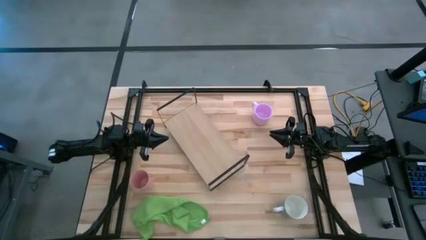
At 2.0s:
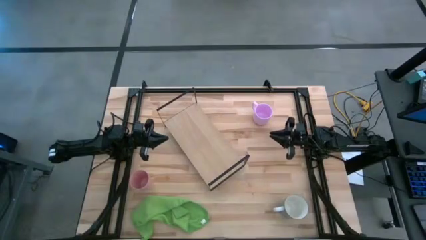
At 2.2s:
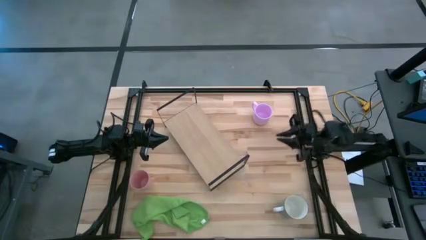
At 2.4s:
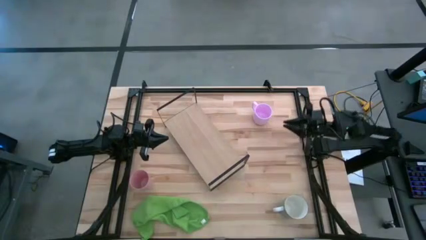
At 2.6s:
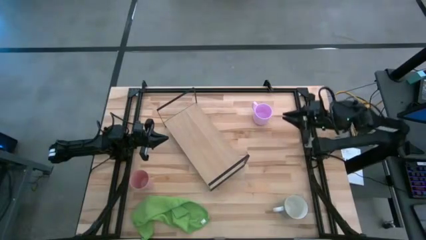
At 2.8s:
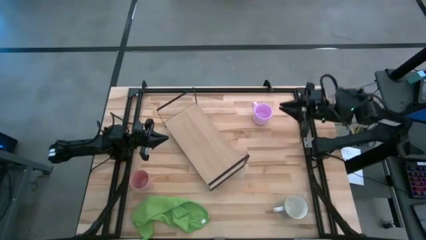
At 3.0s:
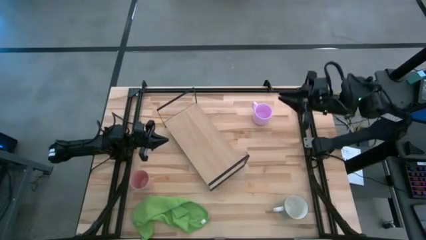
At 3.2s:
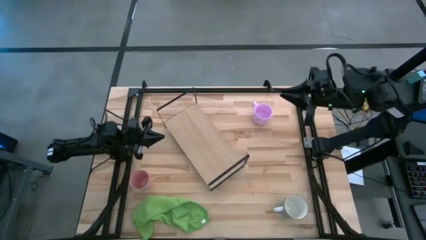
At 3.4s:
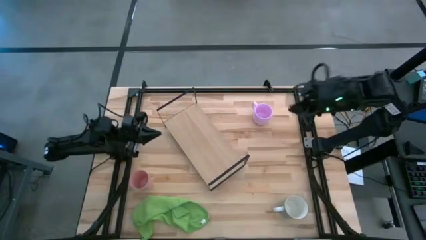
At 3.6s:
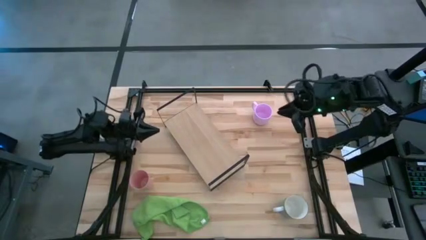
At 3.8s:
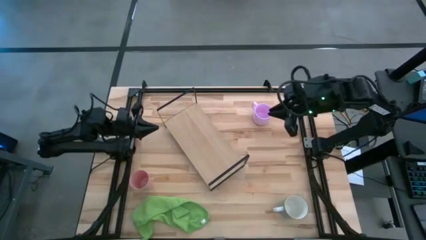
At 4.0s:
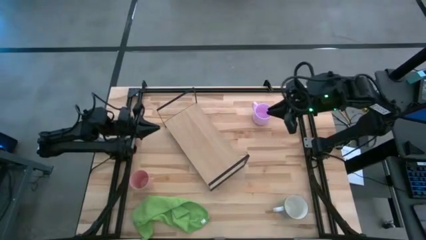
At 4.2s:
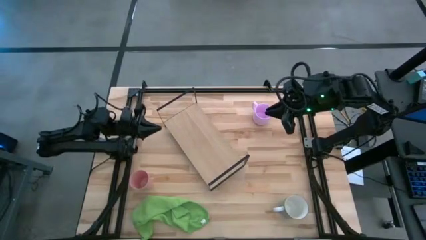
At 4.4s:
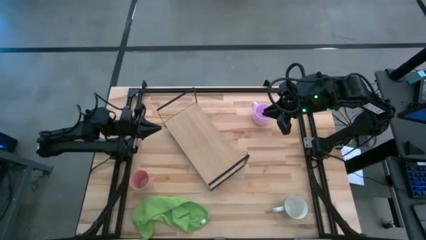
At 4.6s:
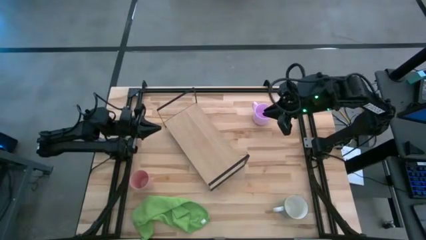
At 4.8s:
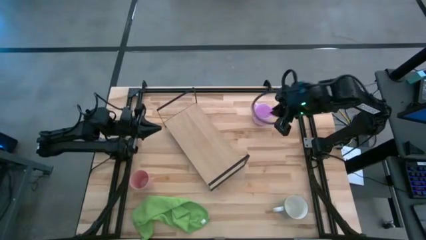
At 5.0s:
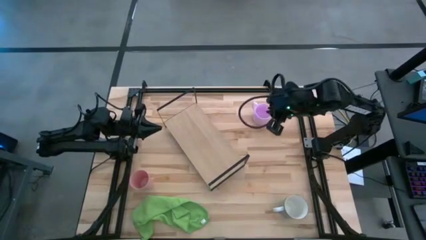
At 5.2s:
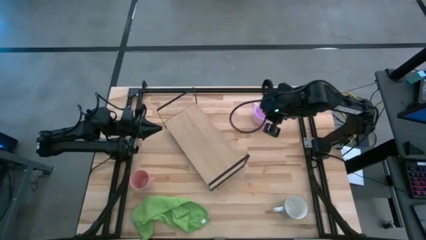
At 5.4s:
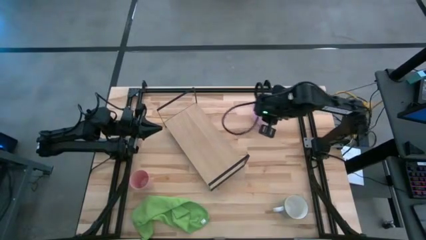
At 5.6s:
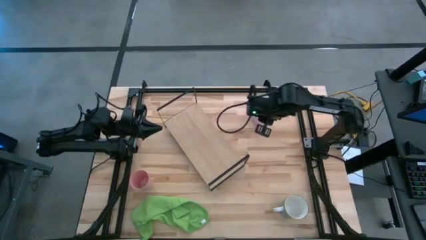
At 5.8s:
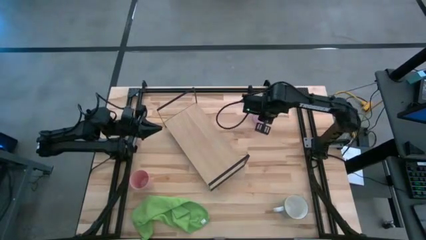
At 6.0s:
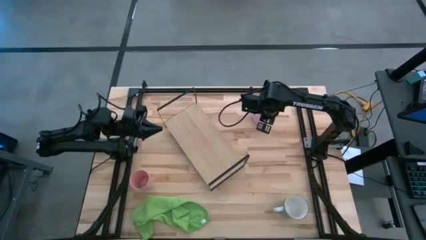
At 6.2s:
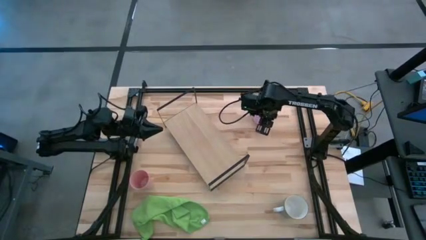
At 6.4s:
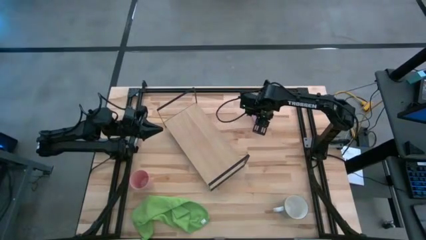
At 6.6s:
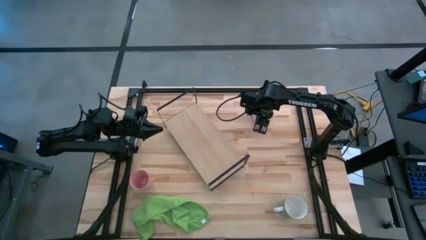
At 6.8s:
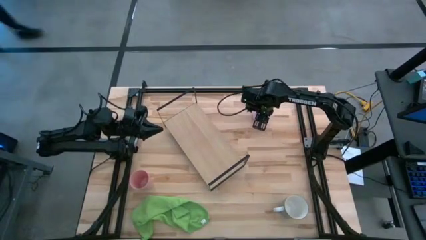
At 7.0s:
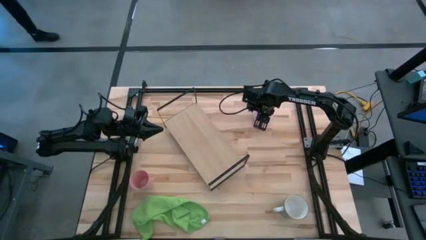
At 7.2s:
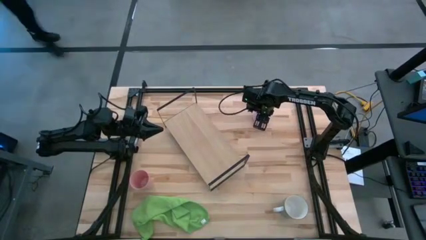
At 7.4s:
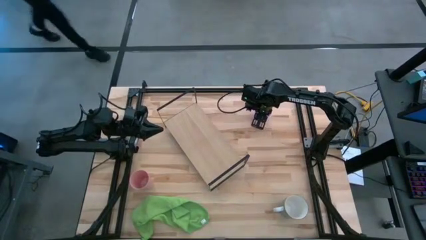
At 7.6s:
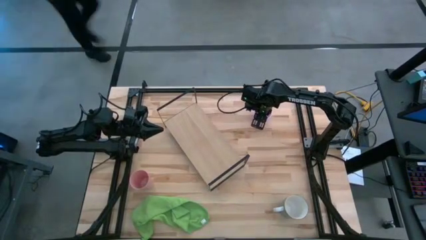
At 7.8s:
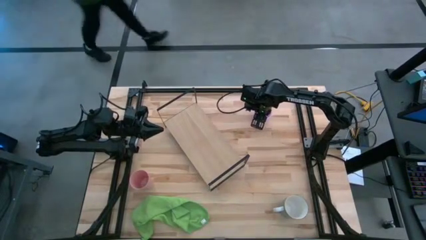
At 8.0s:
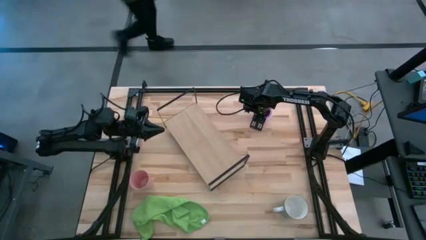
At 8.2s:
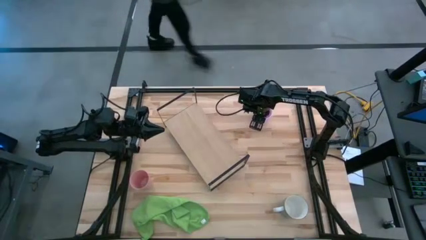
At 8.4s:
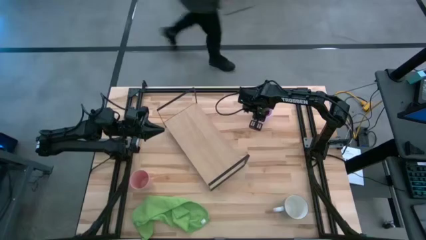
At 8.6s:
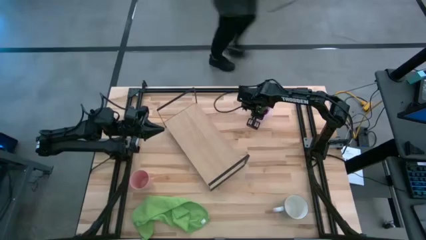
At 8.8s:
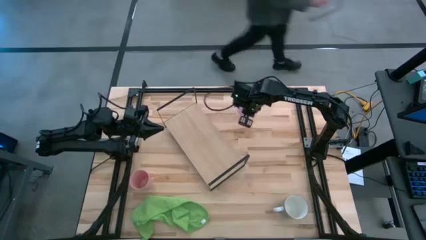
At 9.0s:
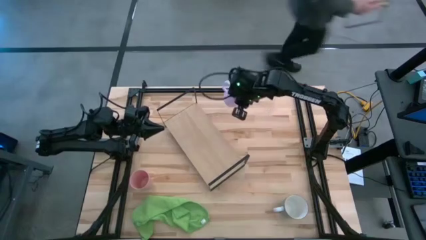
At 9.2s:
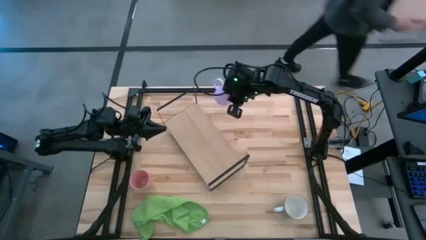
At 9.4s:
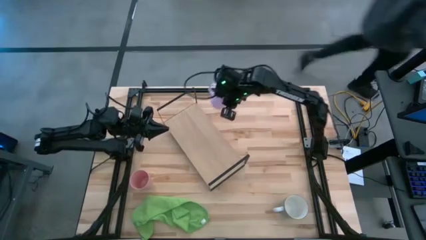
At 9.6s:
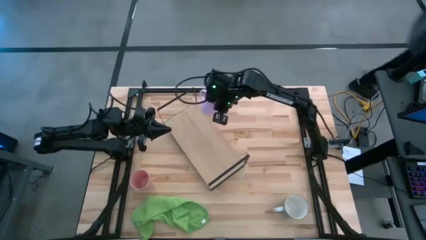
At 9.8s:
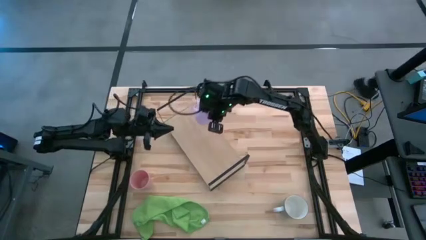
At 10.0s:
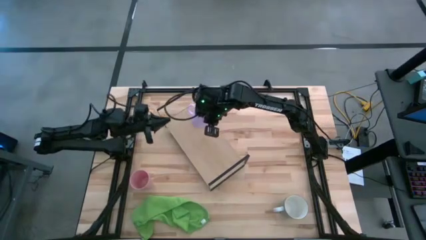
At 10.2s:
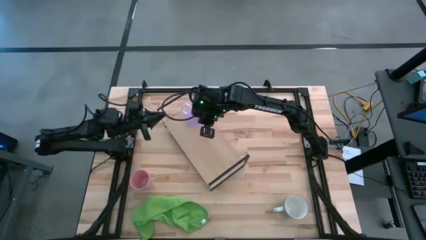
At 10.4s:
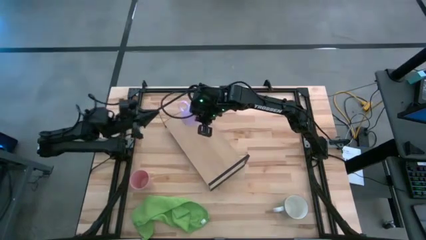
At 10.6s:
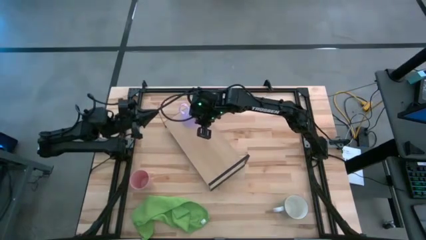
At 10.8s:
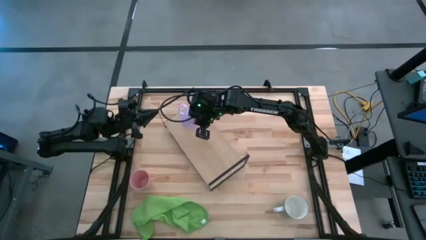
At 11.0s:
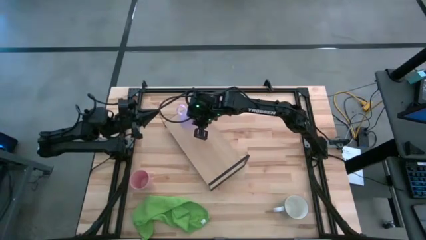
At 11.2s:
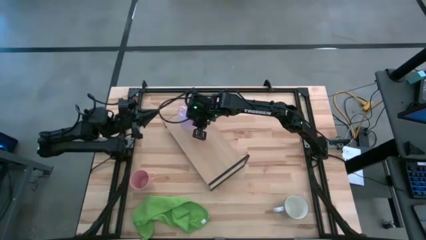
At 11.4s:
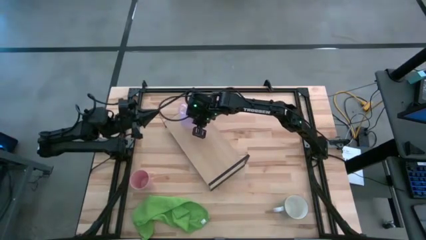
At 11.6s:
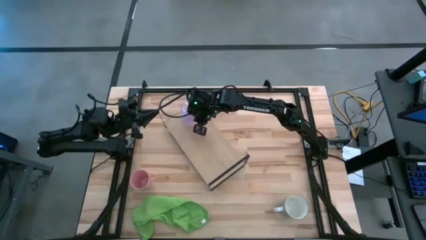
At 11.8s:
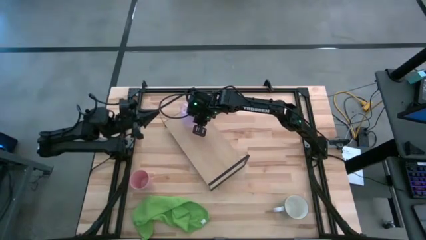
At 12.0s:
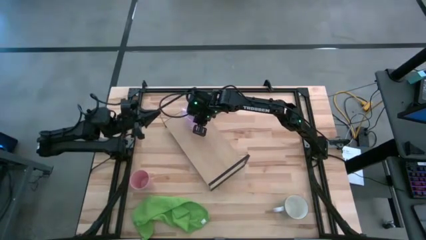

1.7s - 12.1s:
Task: Stack small to large cups/mugs on shelf
Put the light purple mug on the shelf
